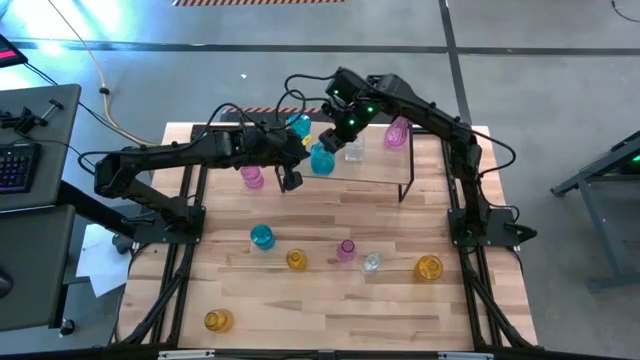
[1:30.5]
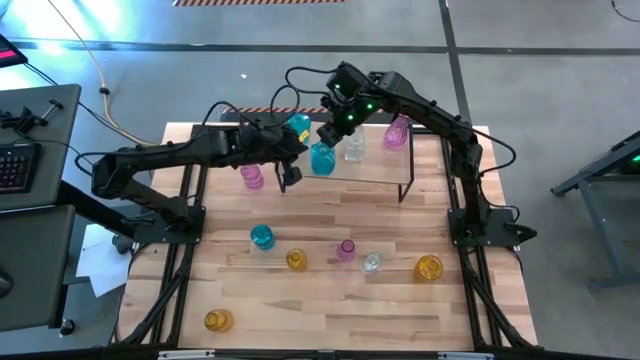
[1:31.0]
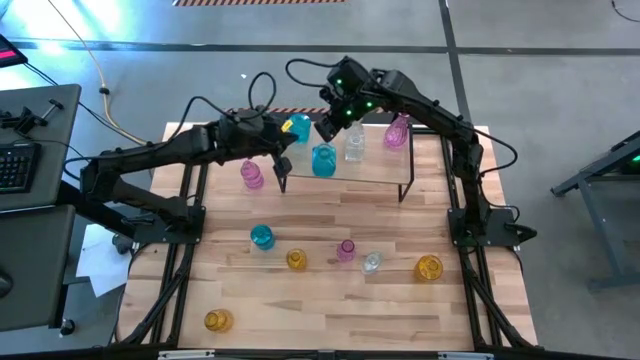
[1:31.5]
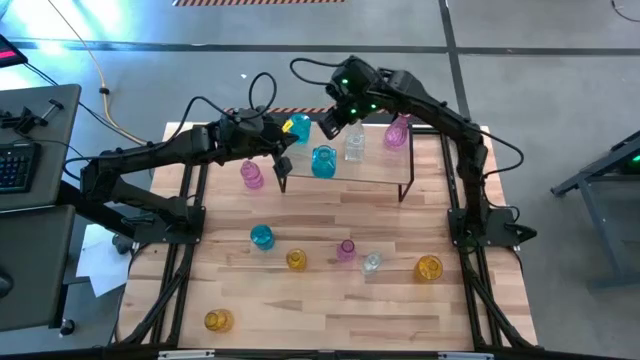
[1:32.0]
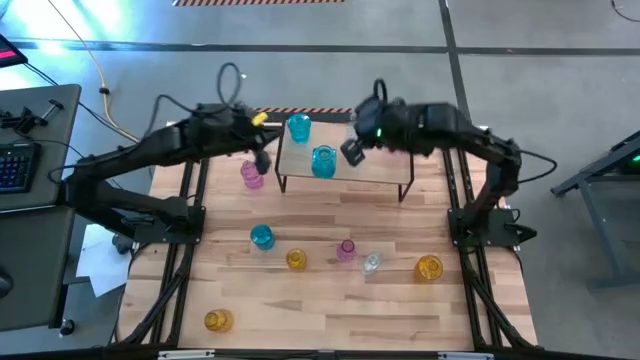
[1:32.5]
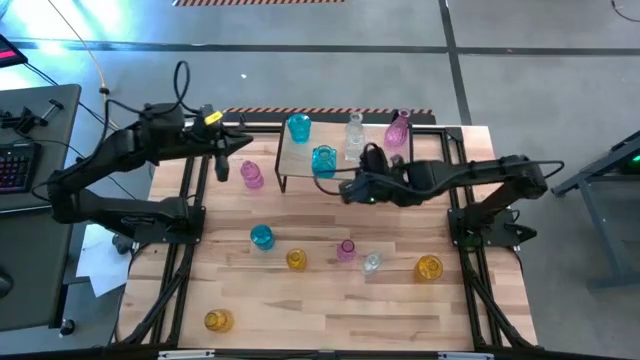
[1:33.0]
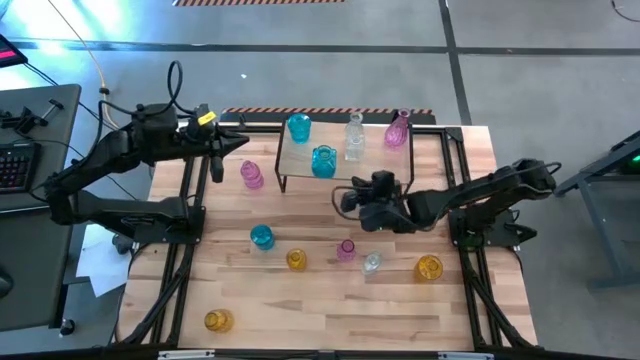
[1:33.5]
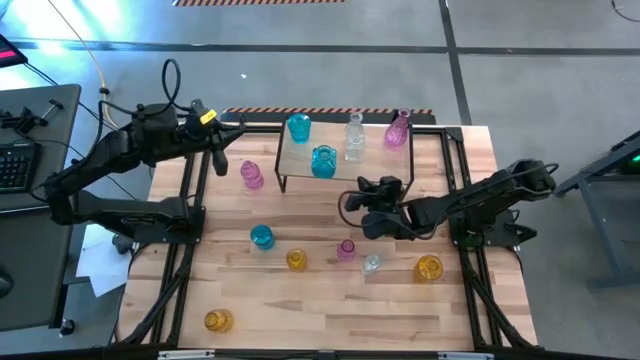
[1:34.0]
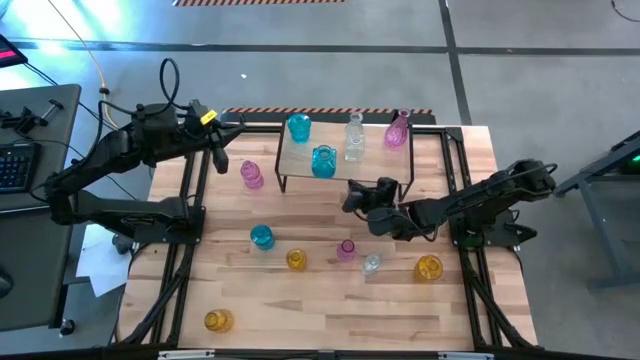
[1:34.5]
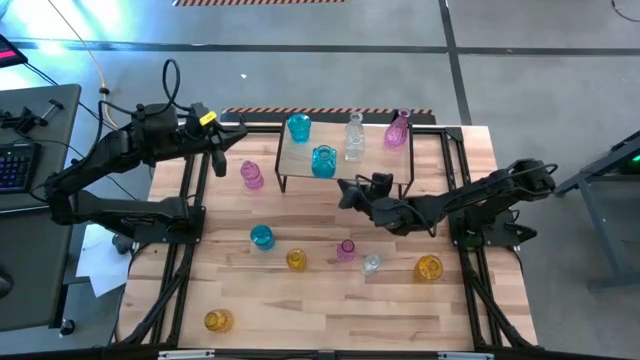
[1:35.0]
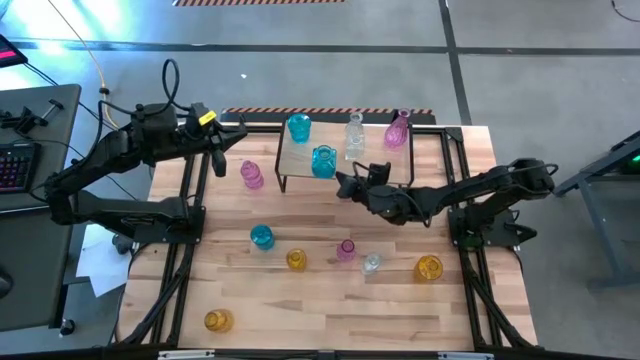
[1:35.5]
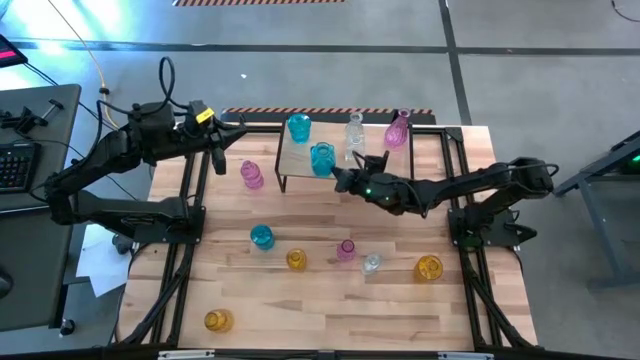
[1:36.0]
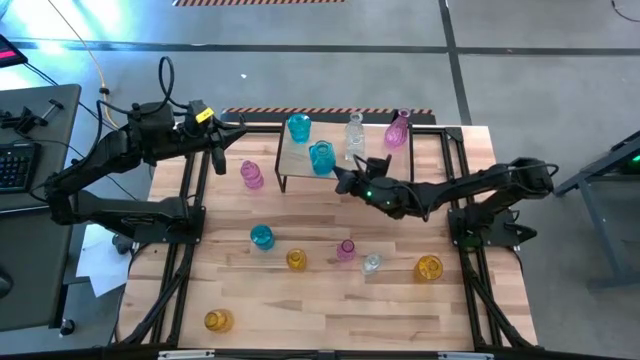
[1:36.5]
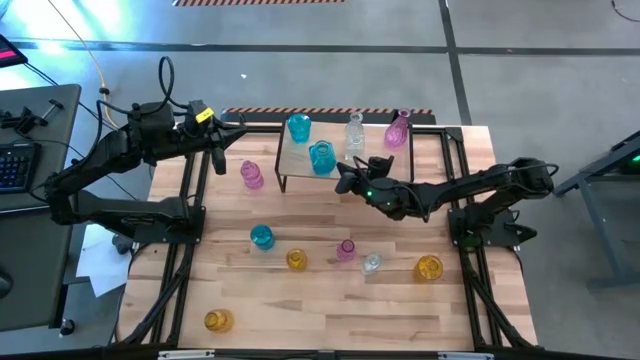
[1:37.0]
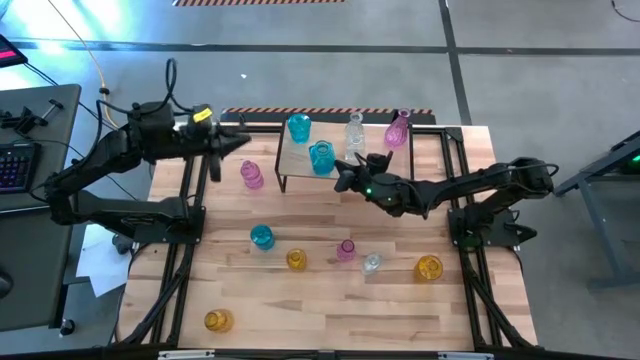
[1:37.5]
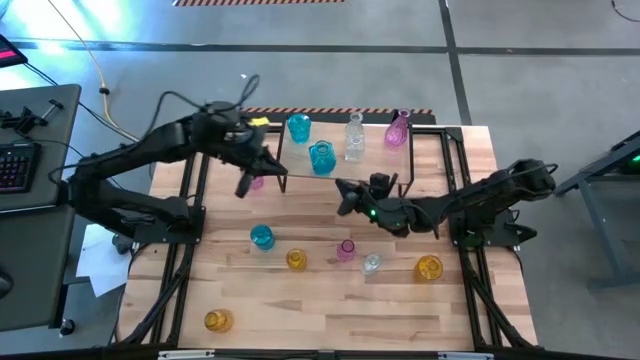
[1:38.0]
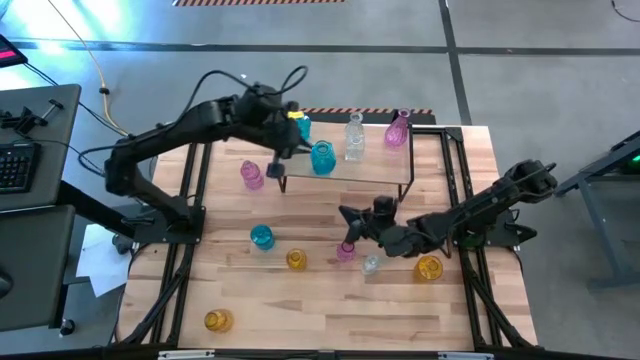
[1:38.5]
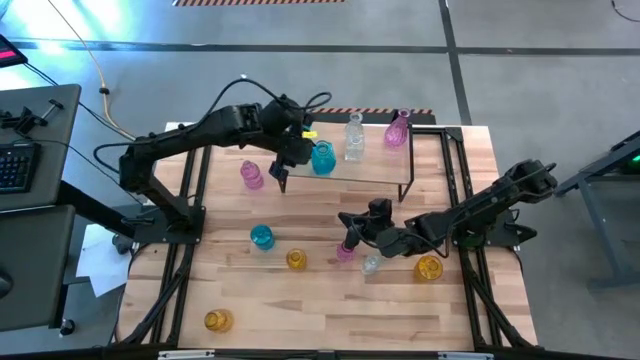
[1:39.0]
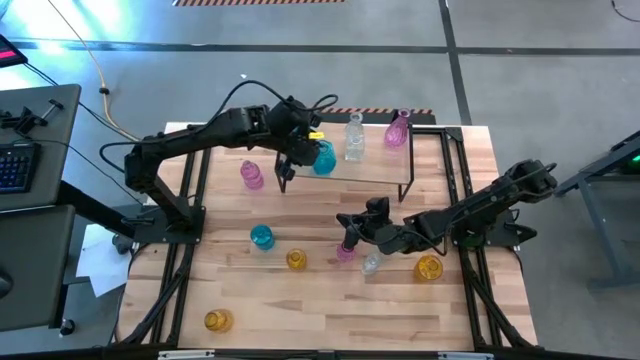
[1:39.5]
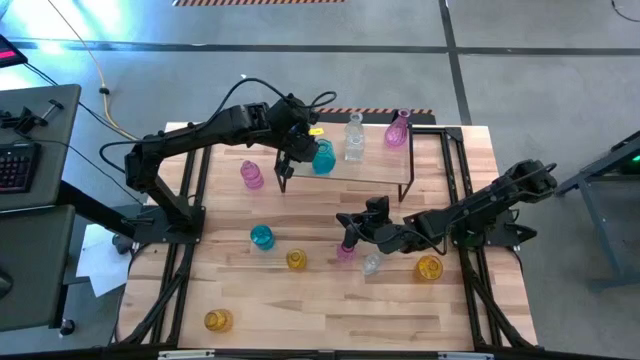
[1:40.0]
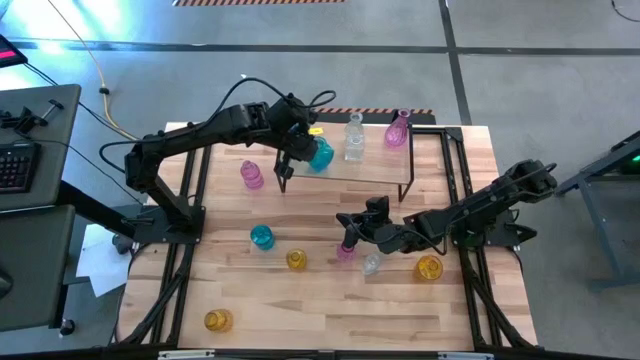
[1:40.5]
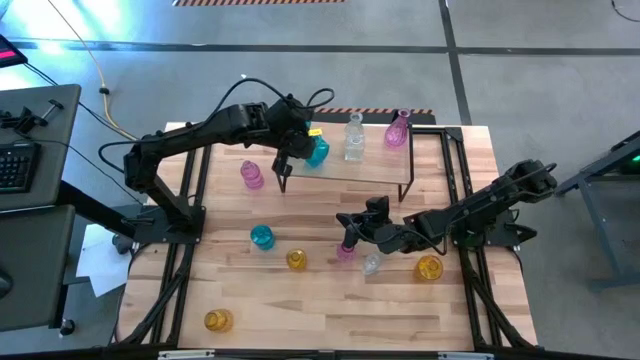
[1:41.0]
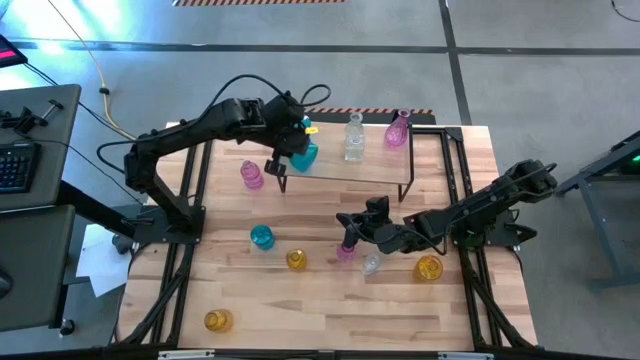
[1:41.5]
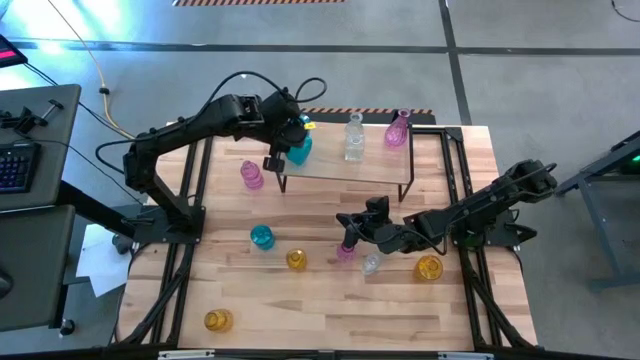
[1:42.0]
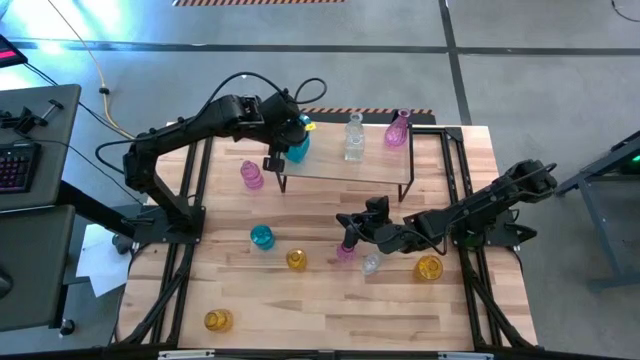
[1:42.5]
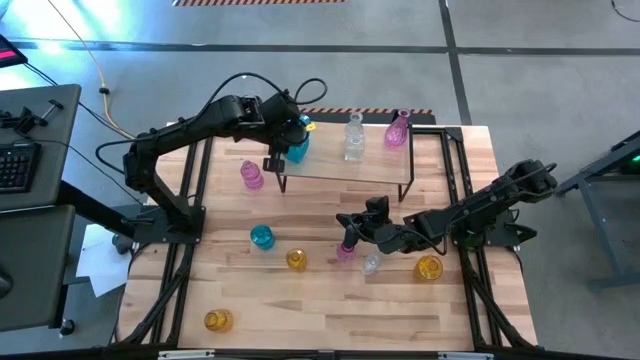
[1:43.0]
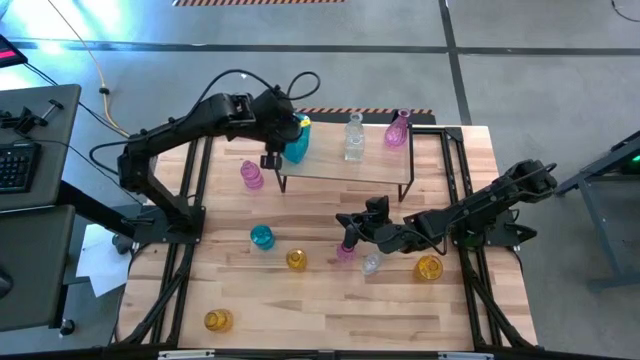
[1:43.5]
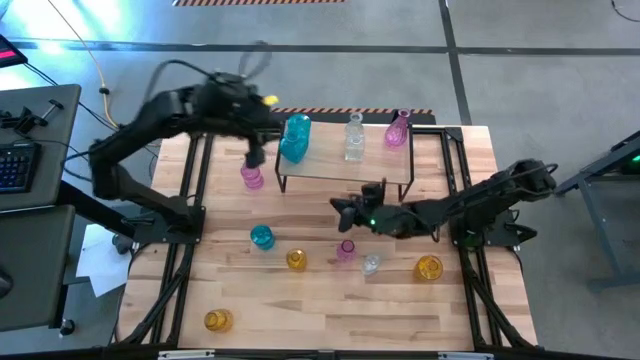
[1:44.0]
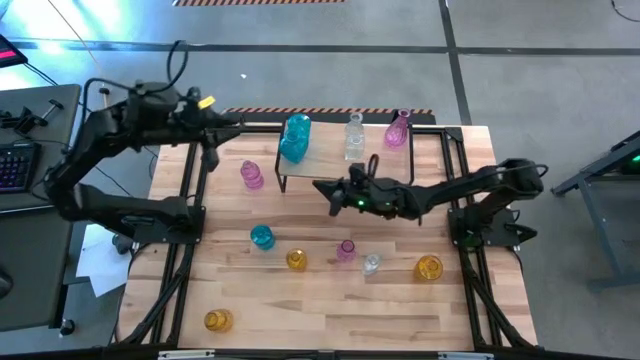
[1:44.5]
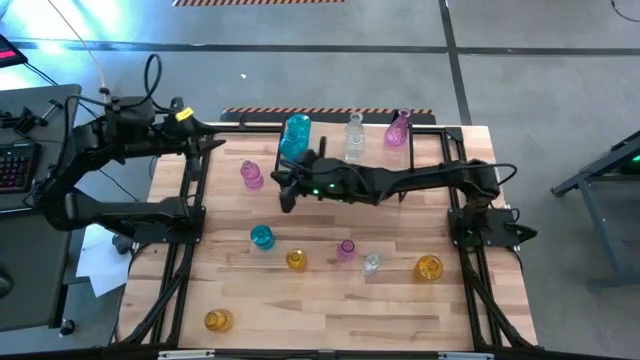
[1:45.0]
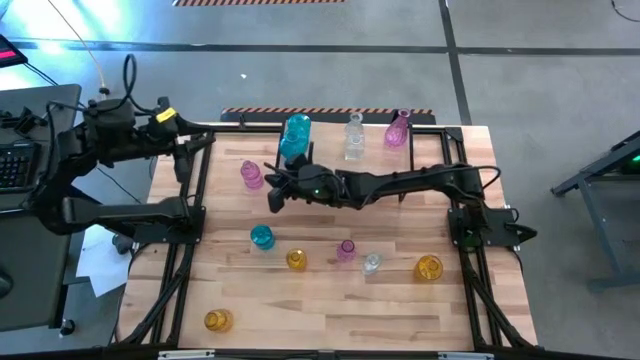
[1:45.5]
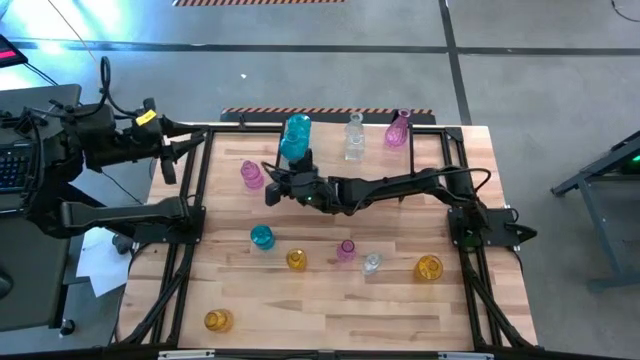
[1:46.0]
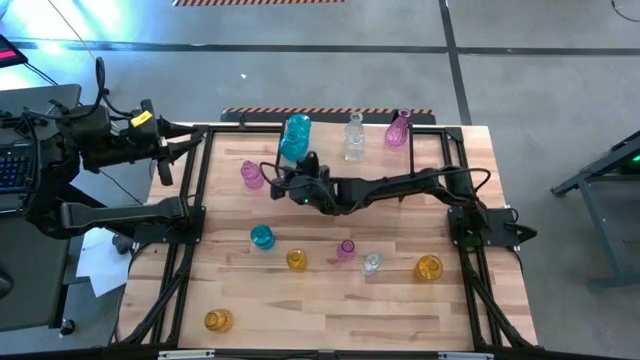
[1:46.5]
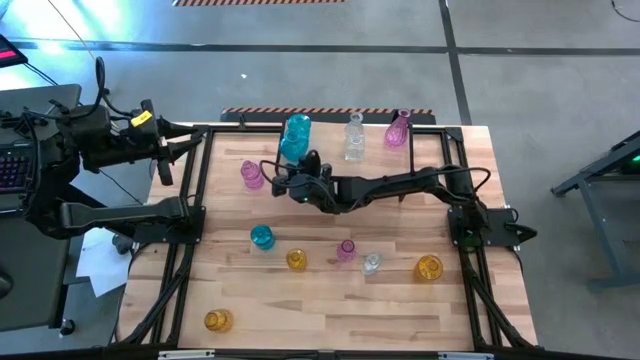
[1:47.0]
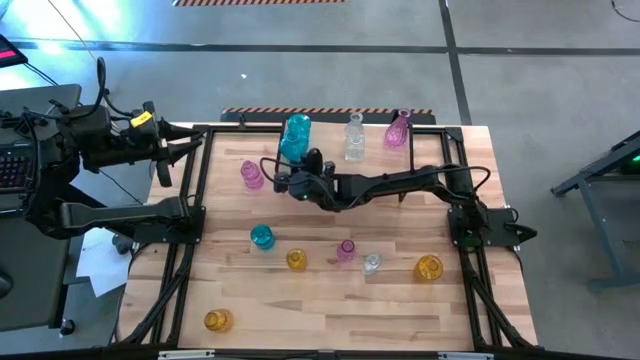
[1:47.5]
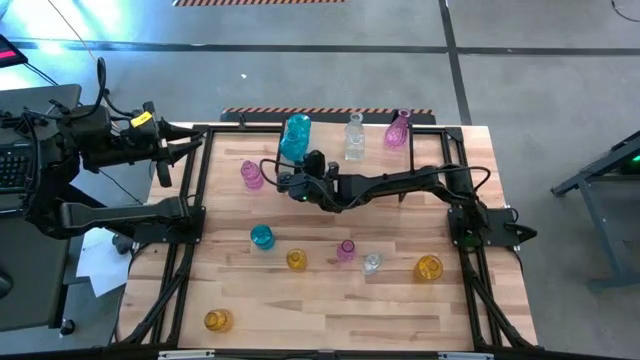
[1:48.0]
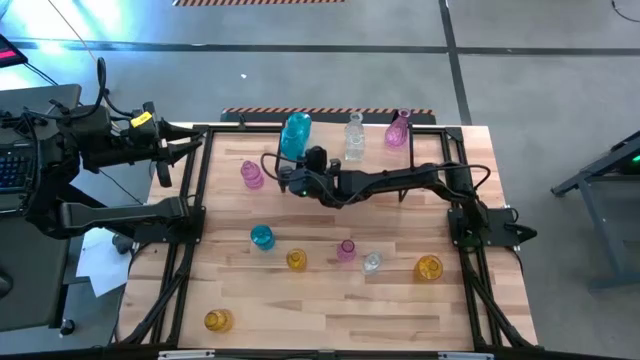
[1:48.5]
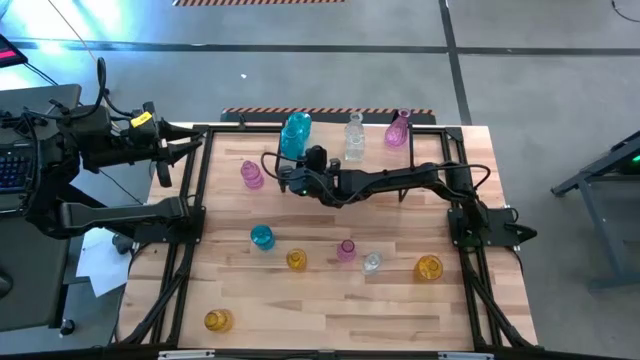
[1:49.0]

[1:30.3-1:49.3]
Task: sort vases onto shelf
Put the right blue vase on the shelf aligned with the other blue vase

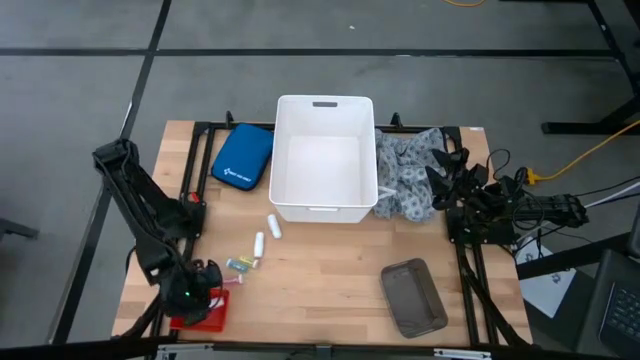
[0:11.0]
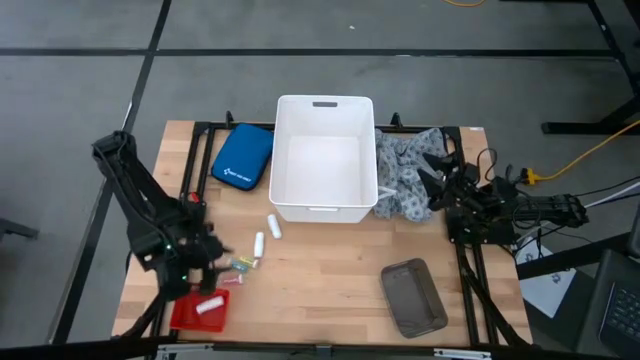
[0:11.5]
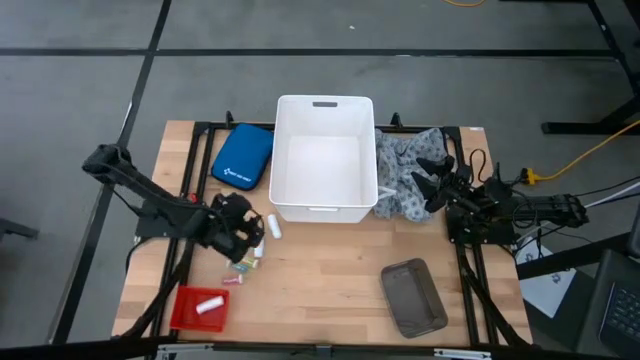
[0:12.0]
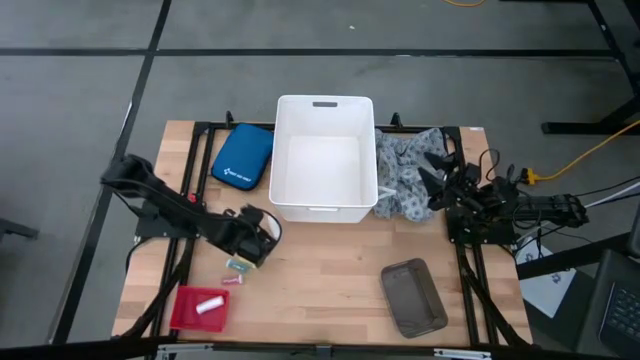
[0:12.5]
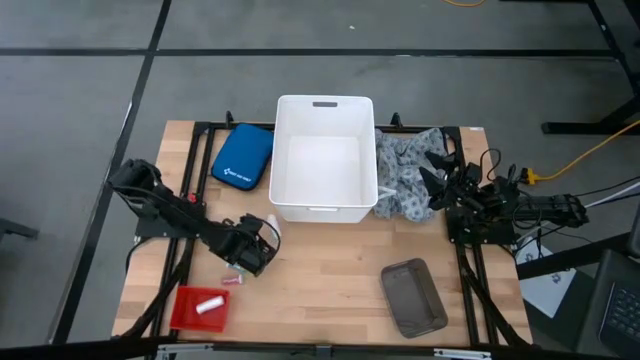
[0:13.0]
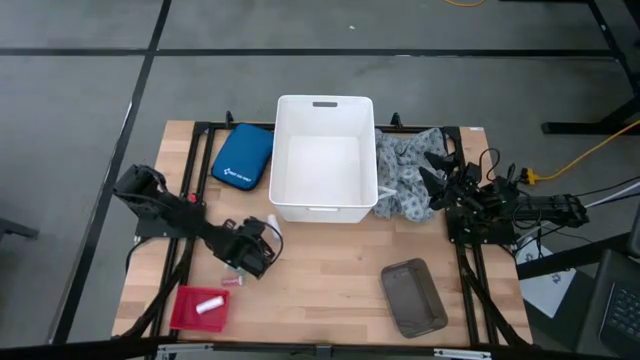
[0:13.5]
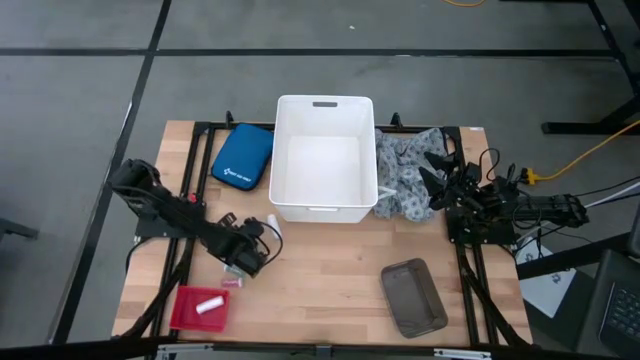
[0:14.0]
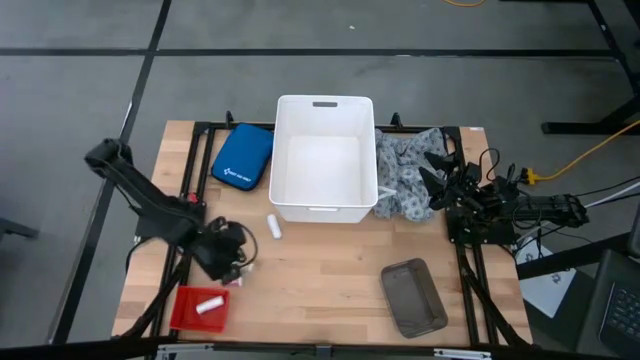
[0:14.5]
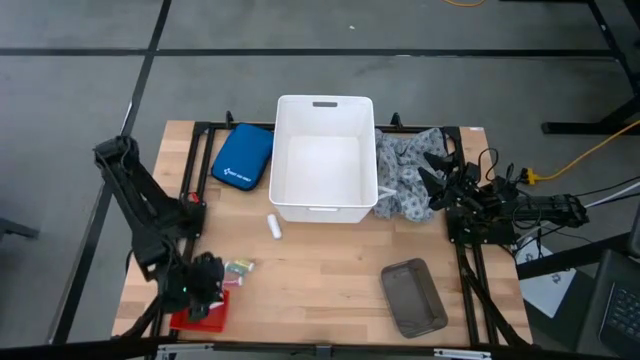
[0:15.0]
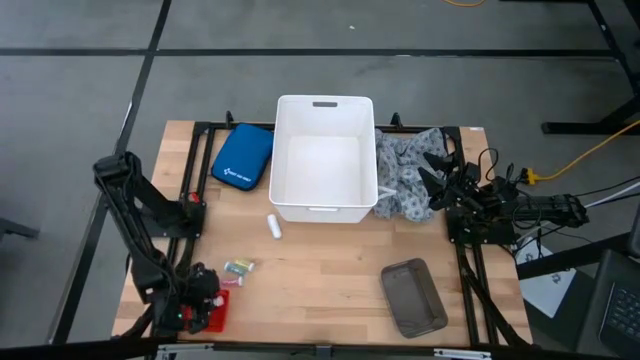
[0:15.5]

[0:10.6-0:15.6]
Task: Pick & place medical supplies in basket/bin
Put the bottom white rolled gauze into the red bin
